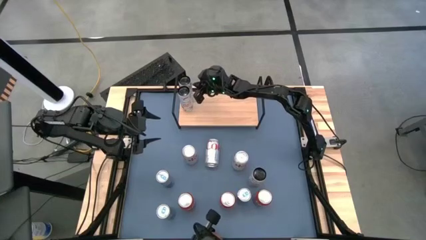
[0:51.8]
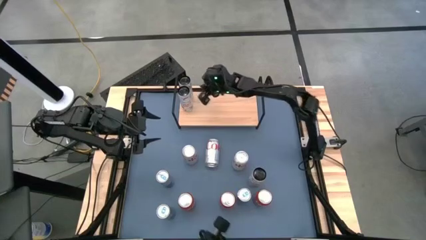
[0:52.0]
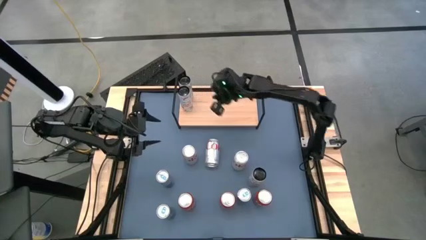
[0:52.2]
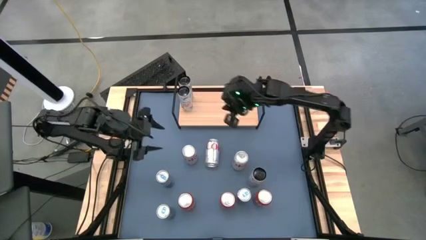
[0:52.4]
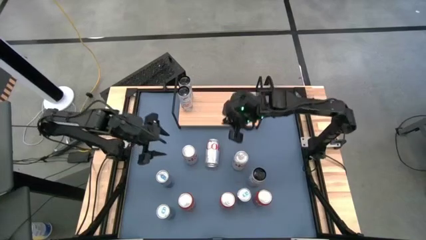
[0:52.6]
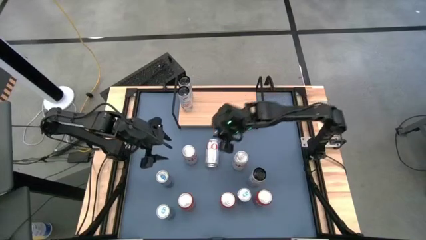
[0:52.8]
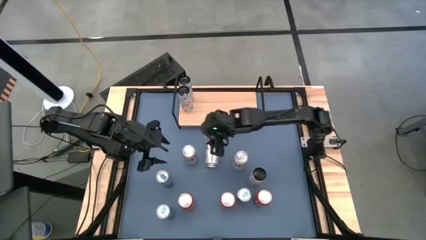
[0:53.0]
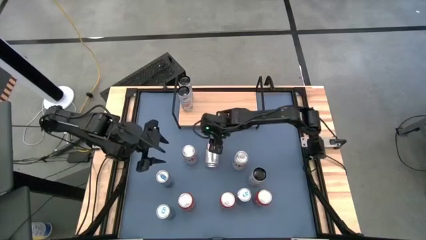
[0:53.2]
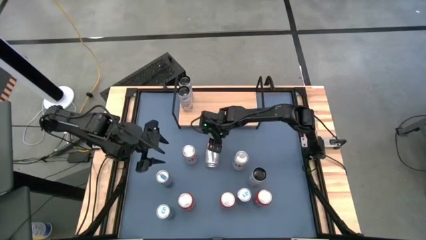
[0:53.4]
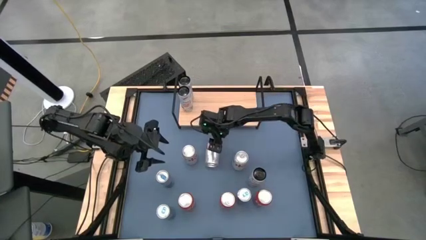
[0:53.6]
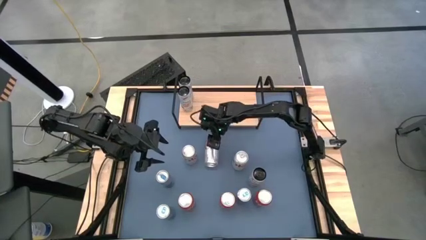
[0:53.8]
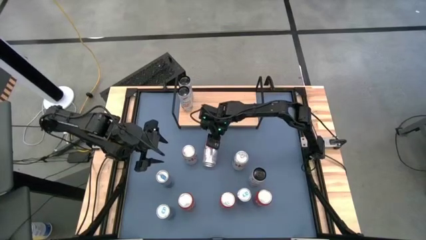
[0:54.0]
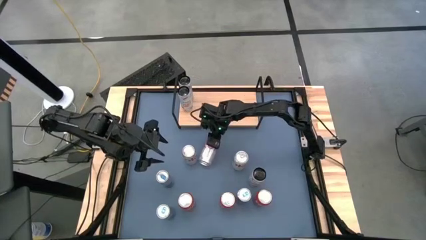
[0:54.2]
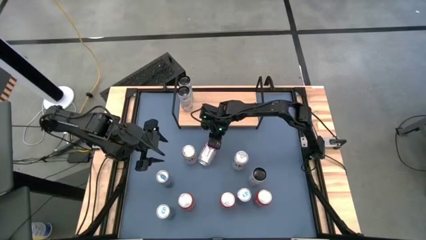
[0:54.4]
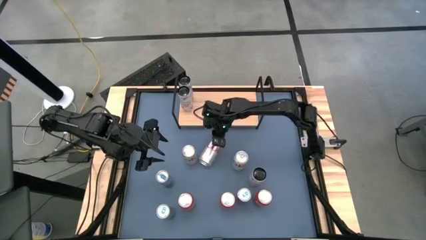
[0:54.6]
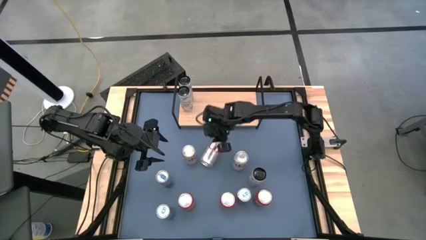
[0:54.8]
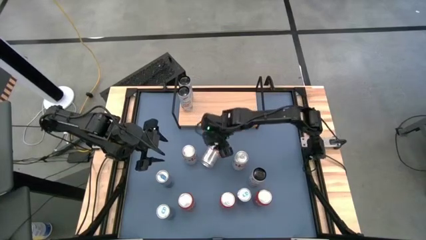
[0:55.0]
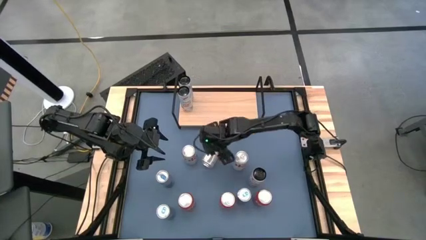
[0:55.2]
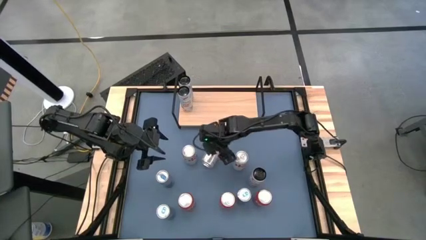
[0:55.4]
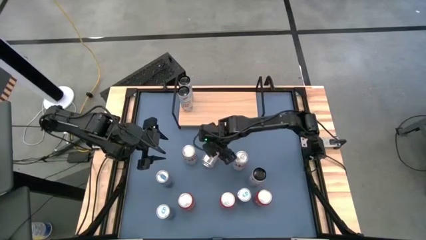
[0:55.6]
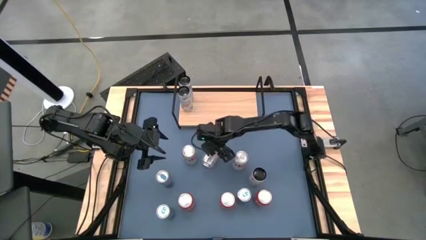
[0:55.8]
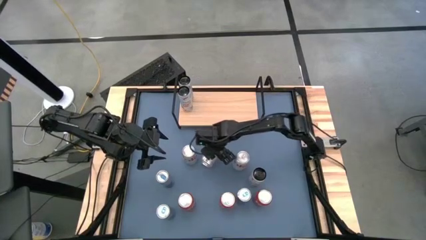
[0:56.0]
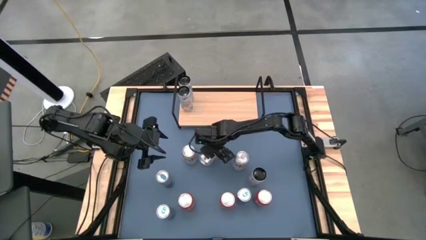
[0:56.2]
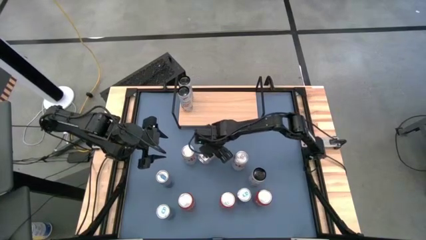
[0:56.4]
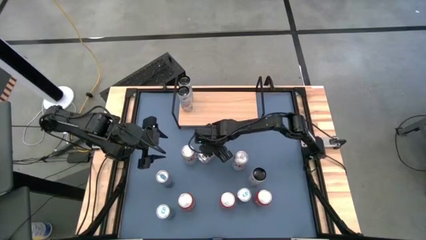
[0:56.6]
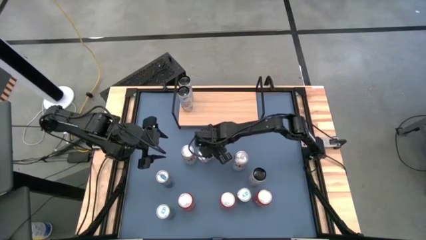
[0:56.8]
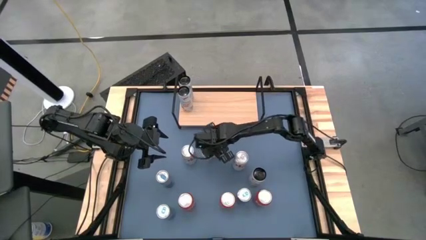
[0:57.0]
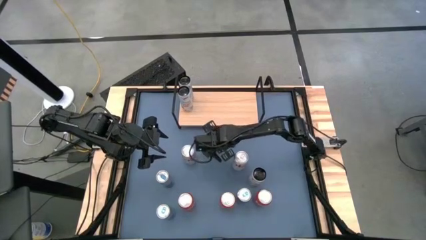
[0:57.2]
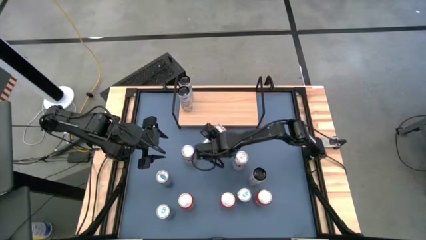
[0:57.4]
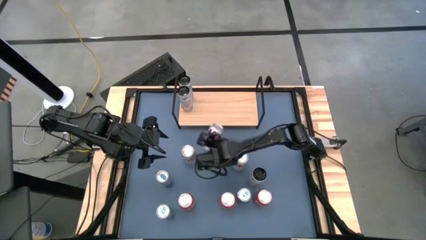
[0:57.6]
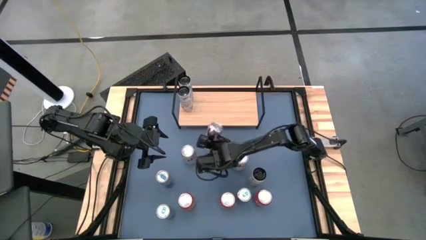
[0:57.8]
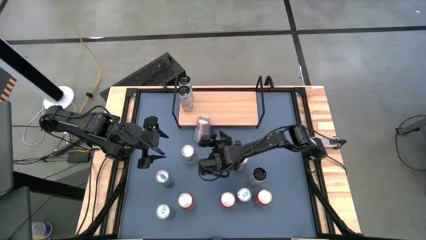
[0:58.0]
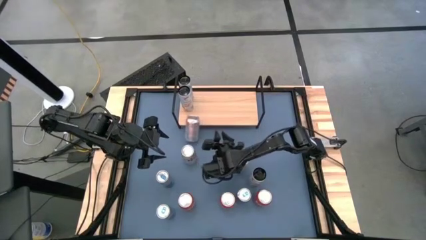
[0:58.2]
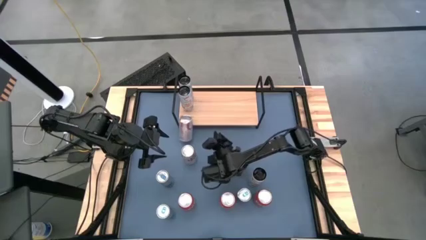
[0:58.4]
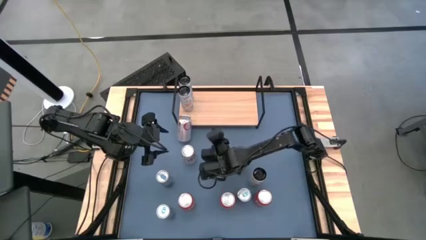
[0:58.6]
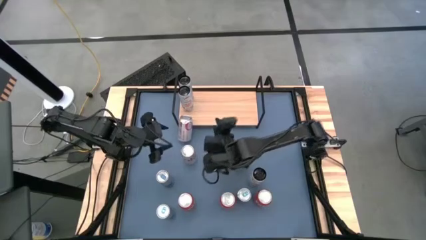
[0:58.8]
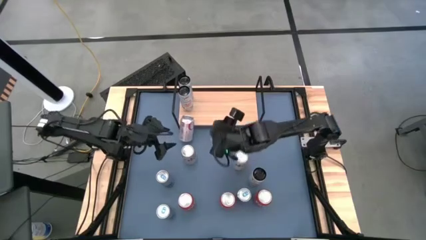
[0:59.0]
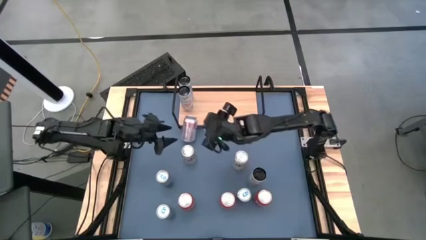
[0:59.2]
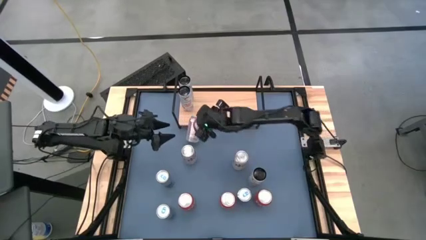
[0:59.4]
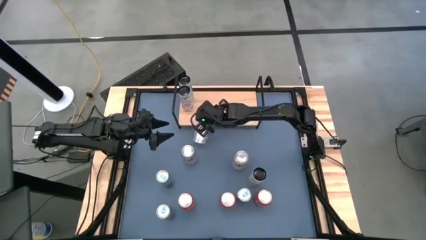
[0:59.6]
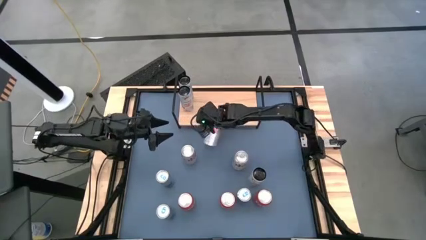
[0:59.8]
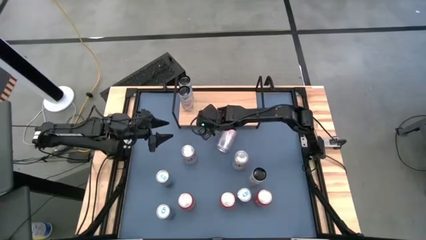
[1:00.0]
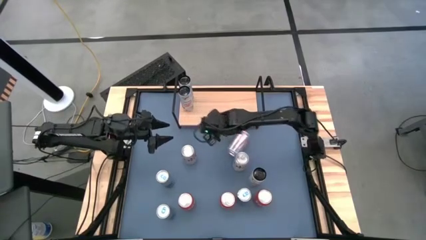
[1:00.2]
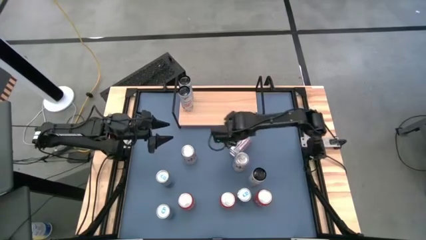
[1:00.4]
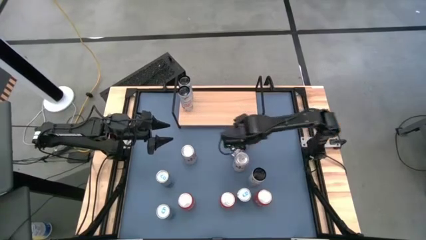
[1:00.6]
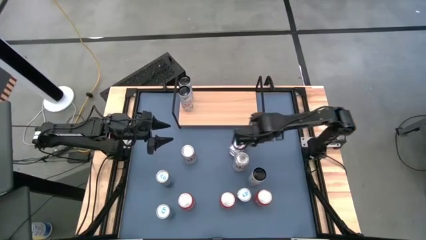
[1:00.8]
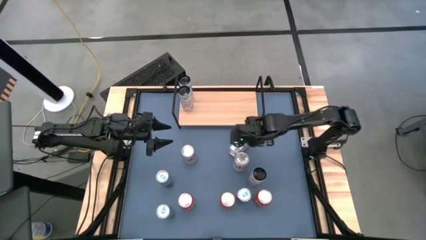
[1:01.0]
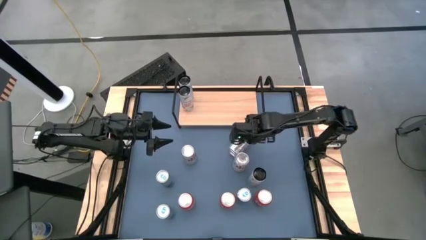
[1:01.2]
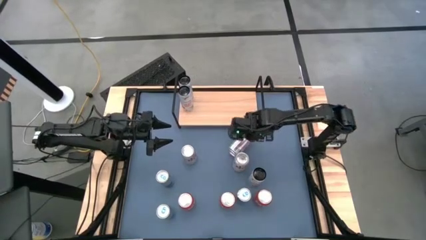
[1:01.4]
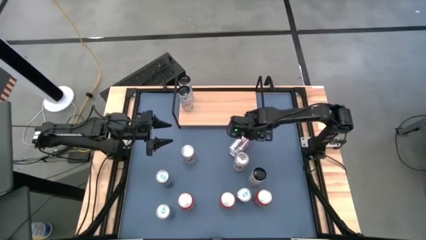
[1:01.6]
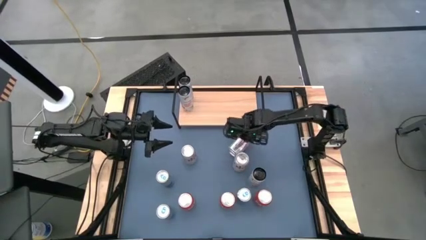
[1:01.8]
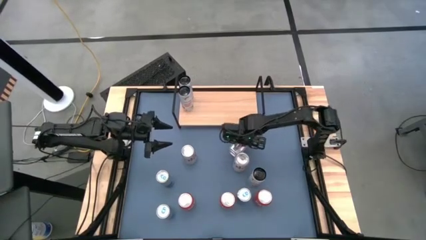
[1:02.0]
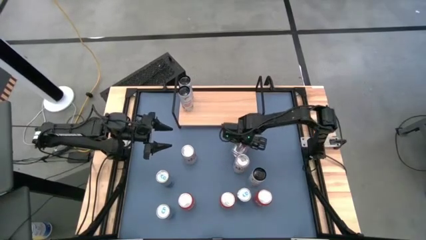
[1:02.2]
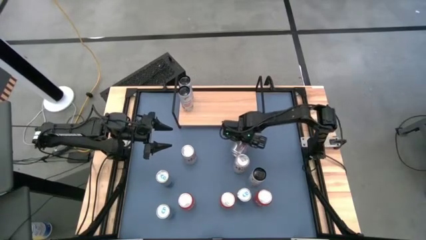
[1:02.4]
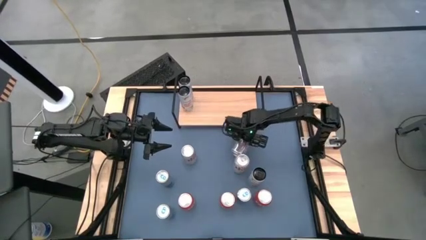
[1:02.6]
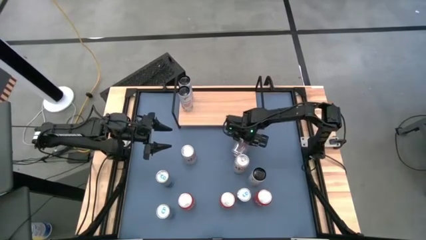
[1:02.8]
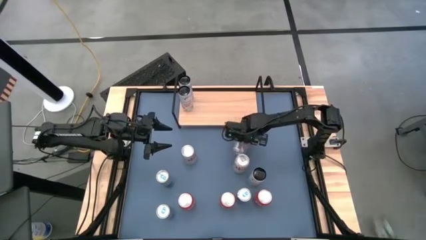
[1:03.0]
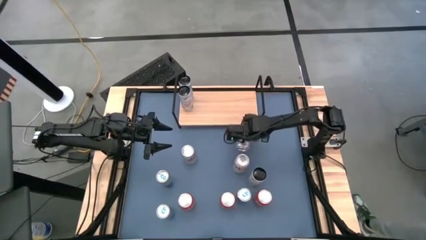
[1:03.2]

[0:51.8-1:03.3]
Task: Place canned beverage on shelf
Move the middle silver soda can to the middle right of the table

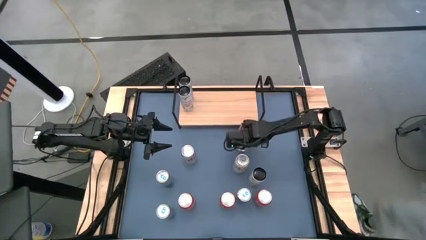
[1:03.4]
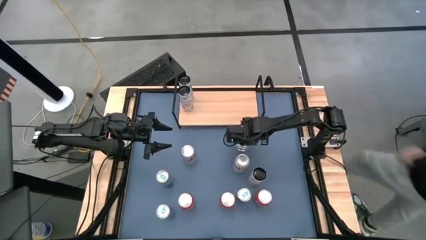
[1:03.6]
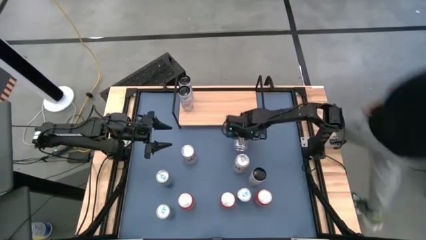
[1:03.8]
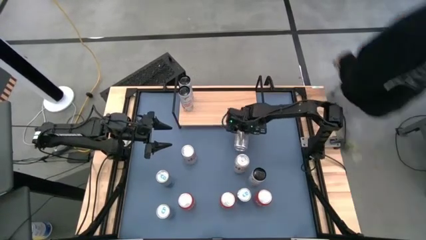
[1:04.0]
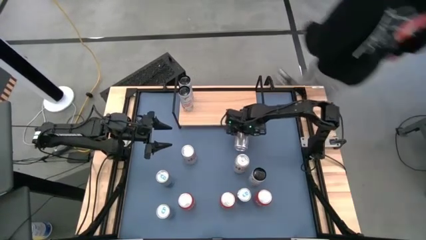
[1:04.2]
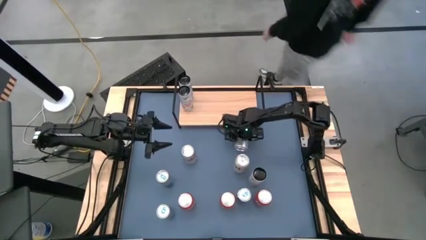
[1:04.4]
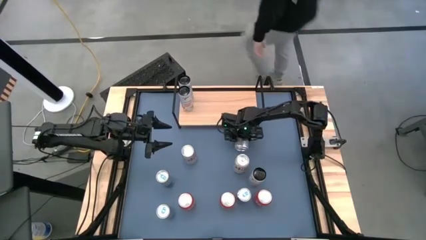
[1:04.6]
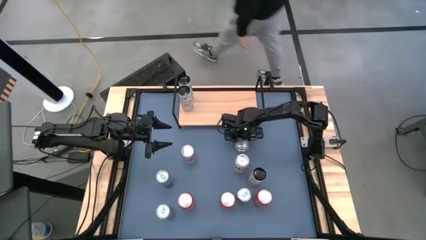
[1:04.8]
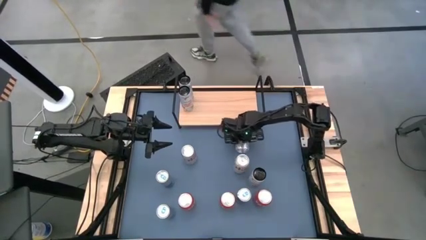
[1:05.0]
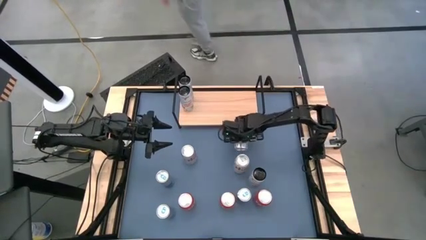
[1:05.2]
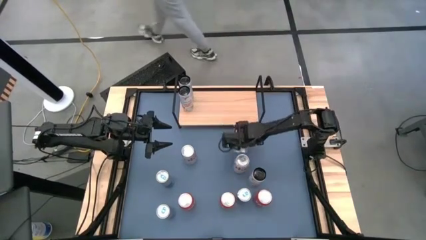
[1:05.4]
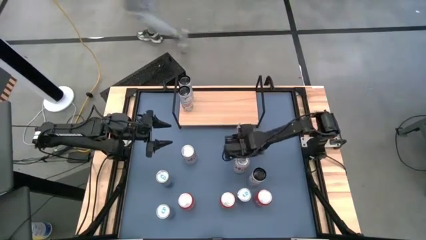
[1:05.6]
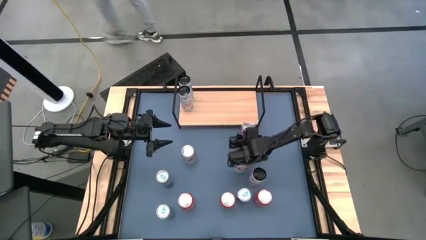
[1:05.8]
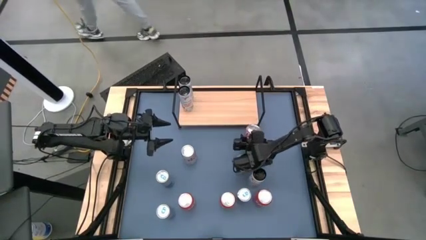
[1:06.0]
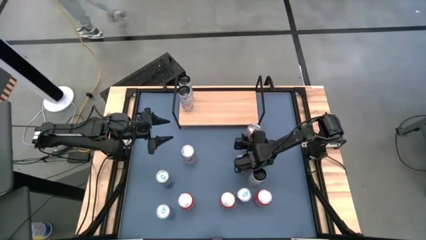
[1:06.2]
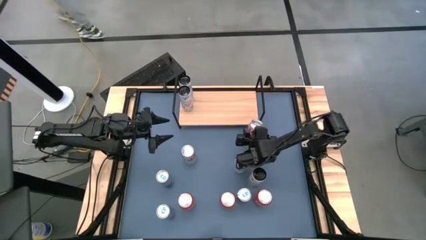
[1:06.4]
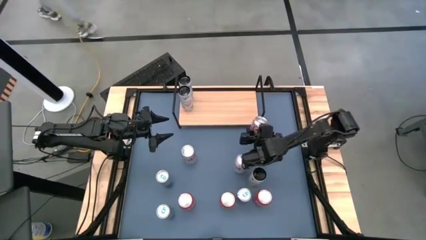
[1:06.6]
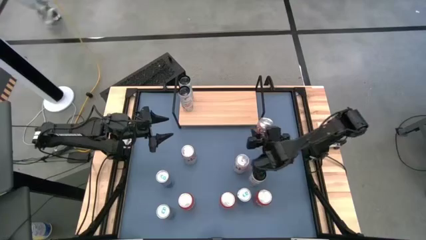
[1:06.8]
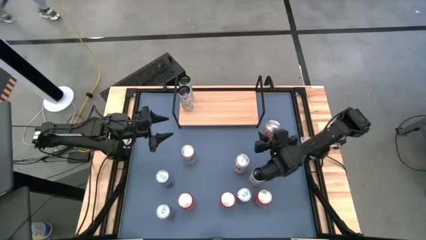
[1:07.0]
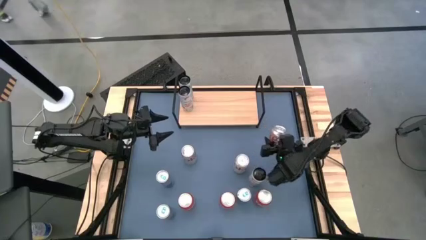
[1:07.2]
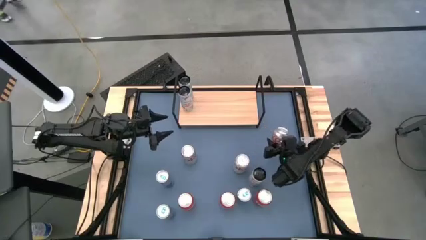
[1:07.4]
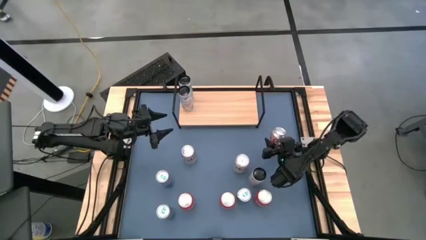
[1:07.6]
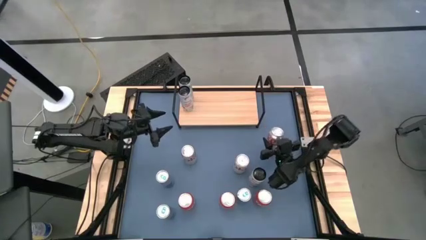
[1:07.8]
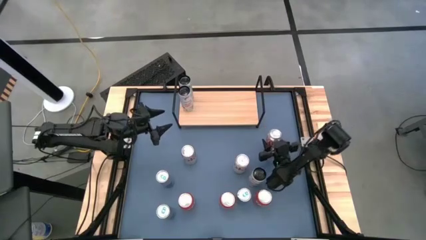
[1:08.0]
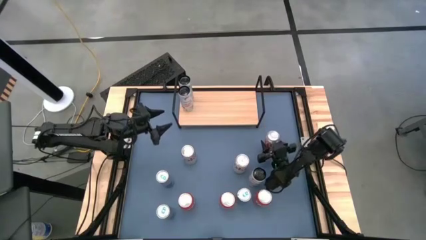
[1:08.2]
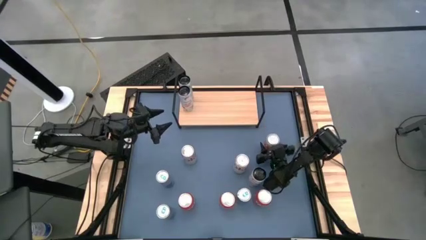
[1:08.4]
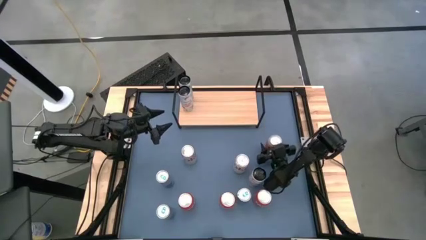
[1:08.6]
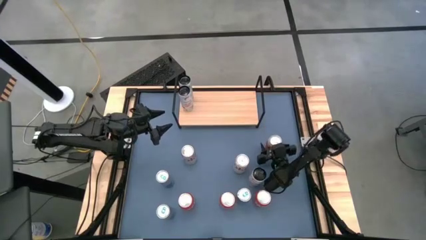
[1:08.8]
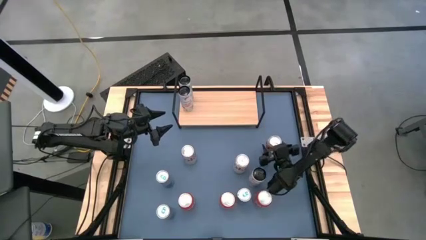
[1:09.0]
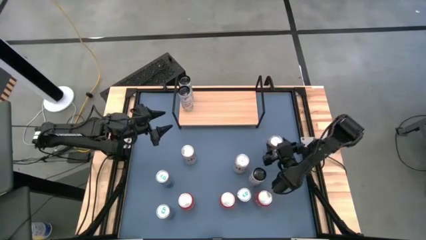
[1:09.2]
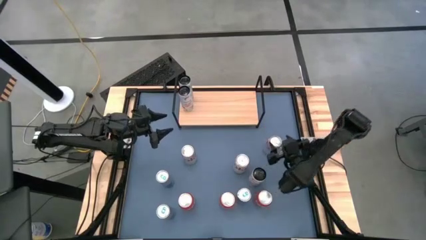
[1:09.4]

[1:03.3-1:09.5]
Move the middle silver soda can to the middle right of the table
